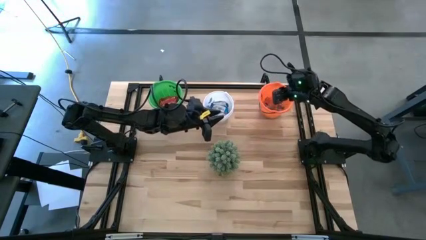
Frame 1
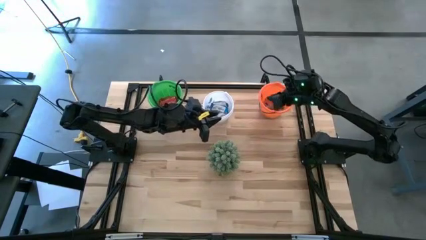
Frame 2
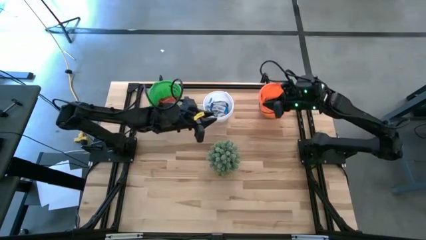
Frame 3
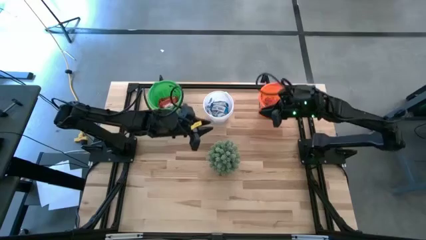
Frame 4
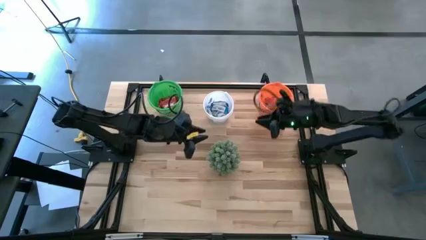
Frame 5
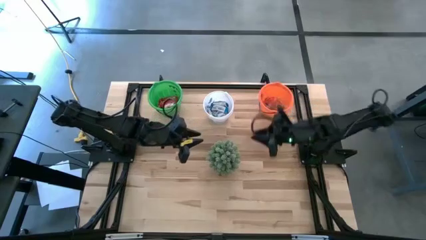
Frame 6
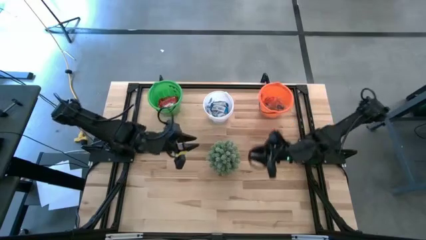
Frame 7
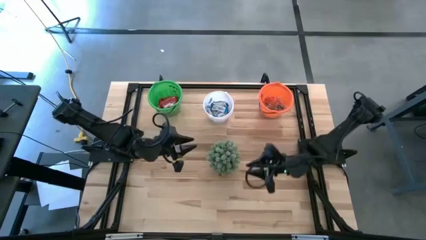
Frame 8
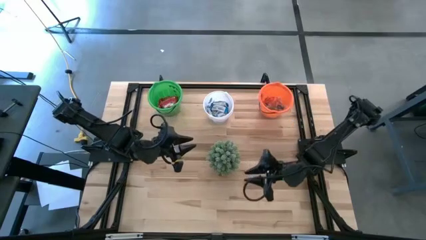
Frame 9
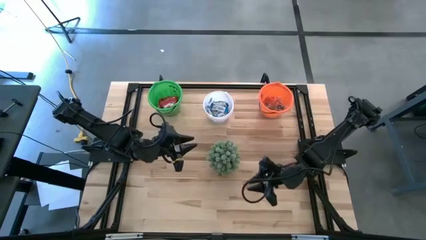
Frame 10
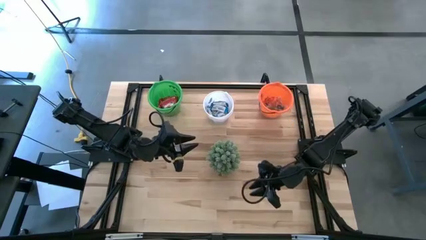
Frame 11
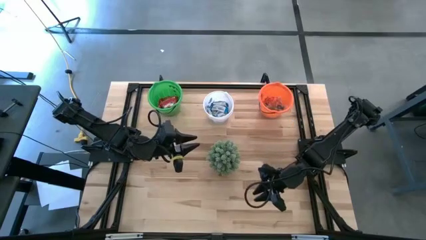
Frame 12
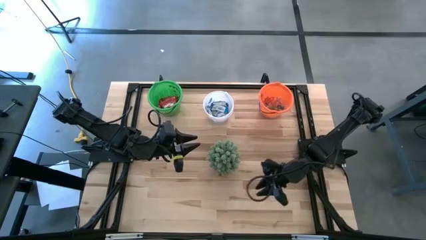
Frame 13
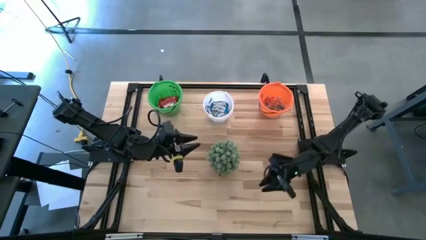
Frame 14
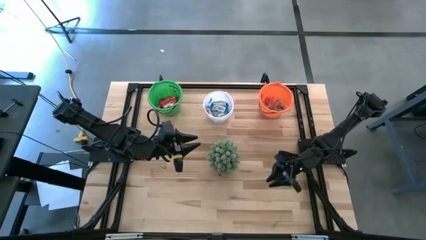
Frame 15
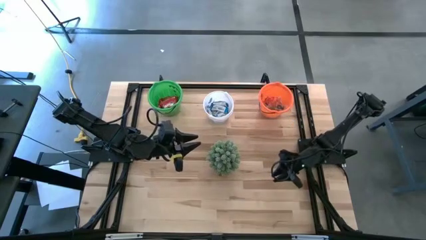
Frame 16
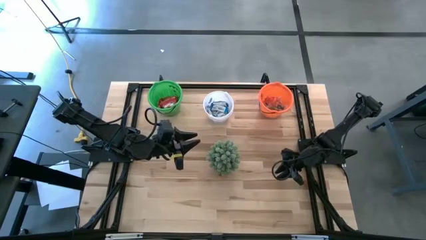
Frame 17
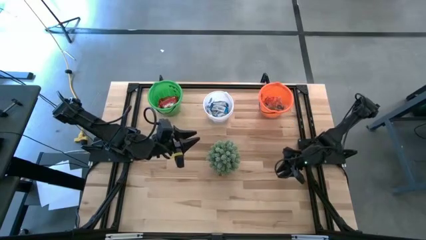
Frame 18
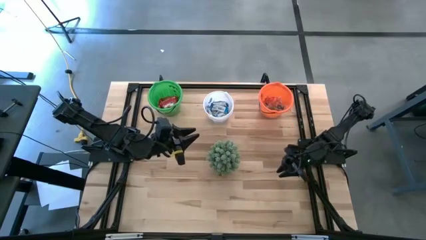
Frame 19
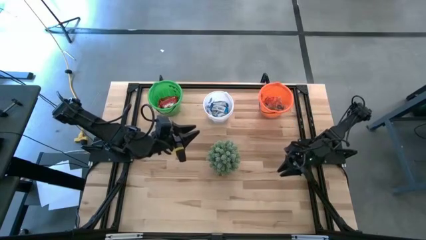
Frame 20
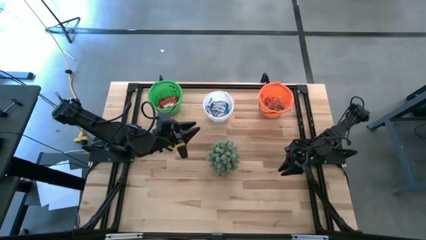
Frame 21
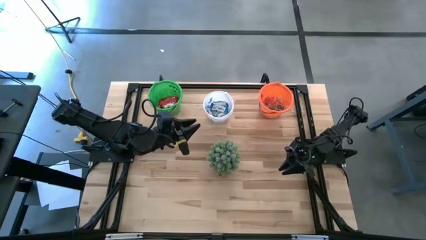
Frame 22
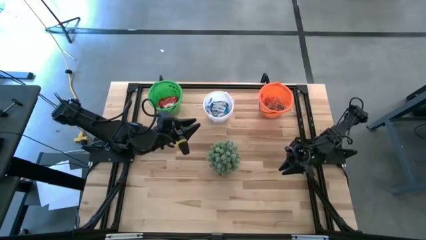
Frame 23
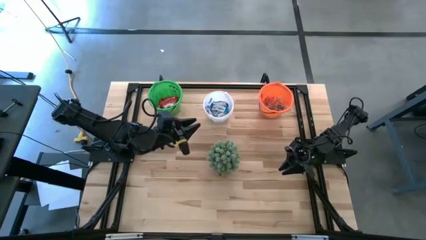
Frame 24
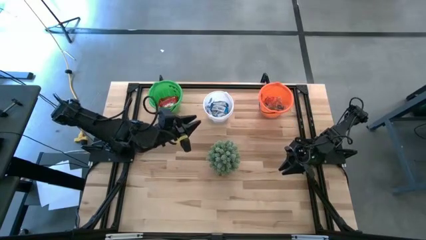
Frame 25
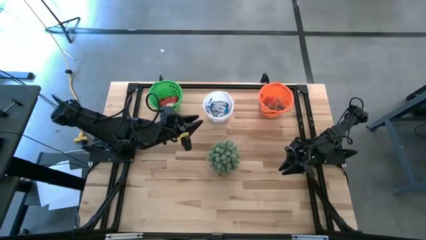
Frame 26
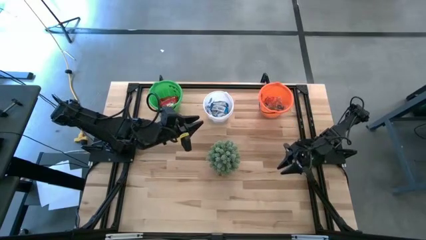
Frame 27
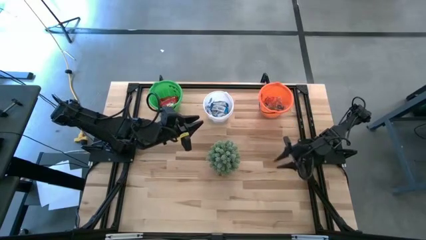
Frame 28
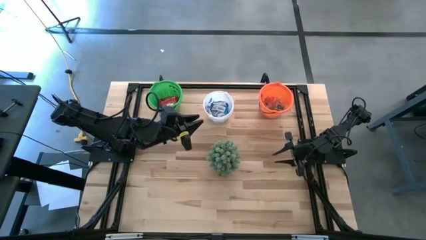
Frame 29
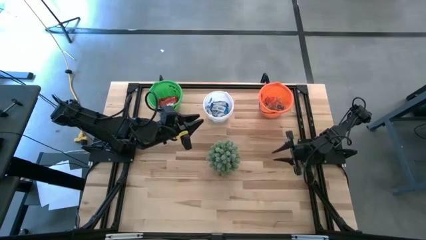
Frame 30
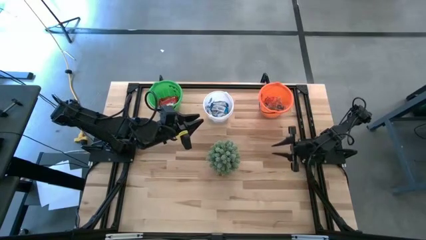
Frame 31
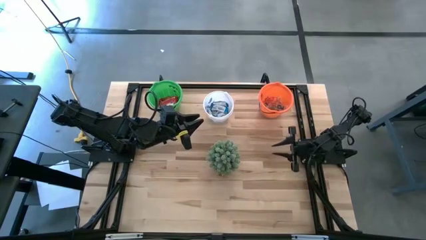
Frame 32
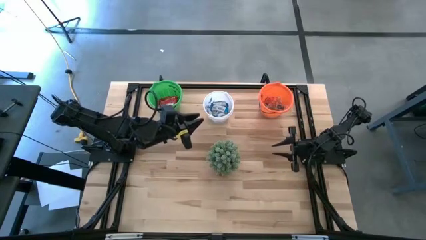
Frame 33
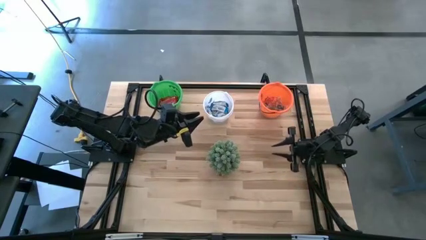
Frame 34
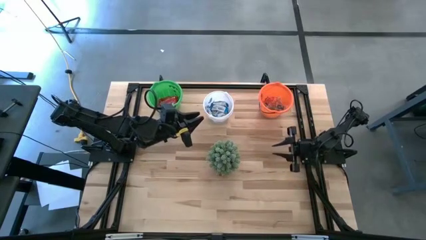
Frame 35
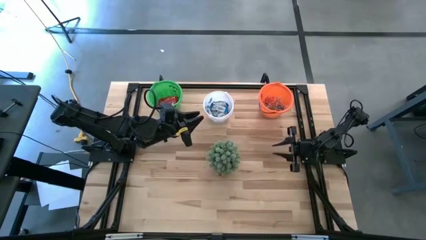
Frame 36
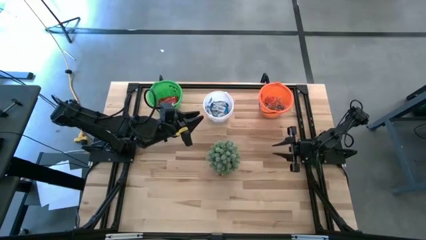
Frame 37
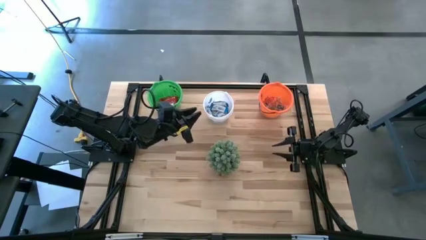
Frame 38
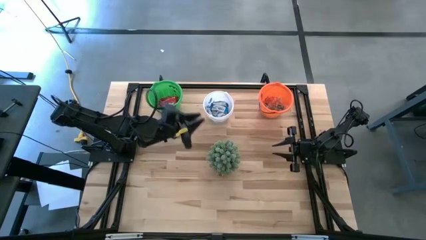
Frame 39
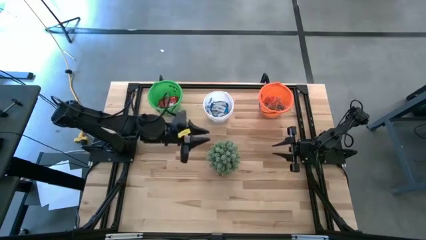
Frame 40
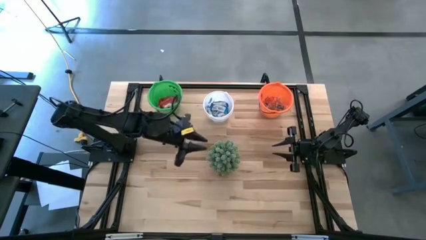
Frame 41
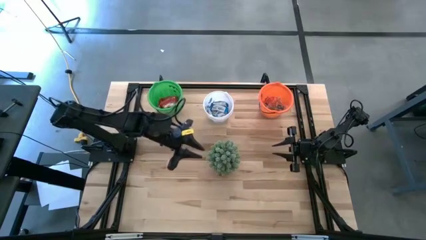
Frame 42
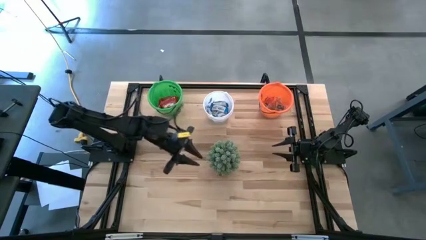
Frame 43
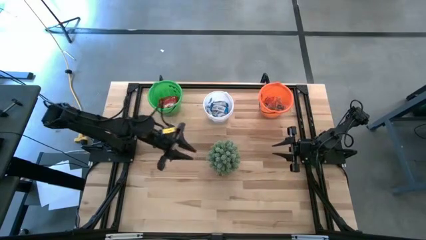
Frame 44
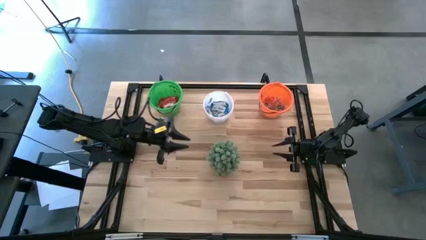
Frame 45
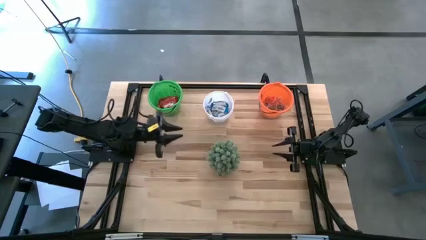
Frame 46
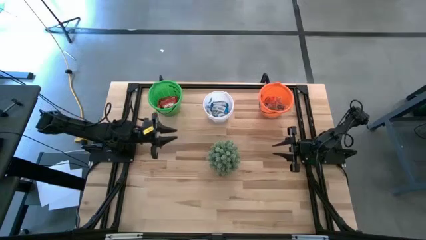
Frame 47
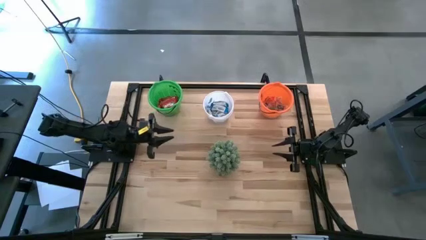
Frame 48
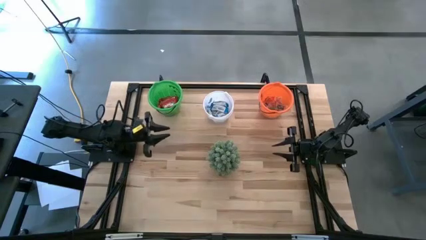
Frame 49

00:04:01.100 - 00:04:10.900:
Task: Sort candy
Return to Home Position

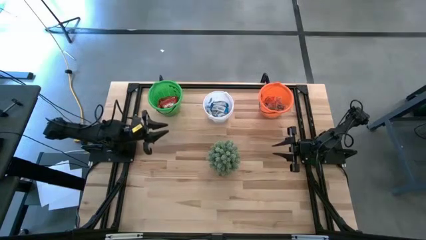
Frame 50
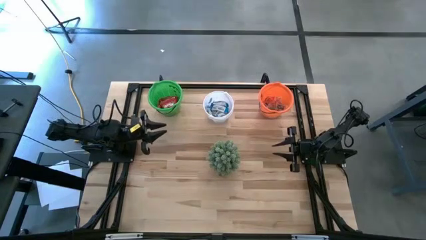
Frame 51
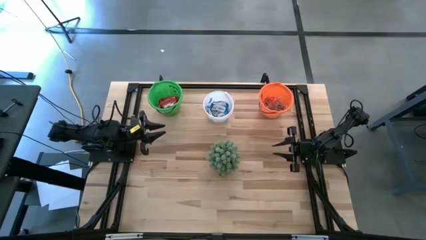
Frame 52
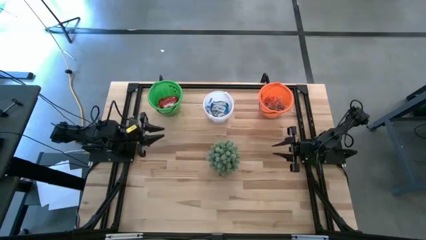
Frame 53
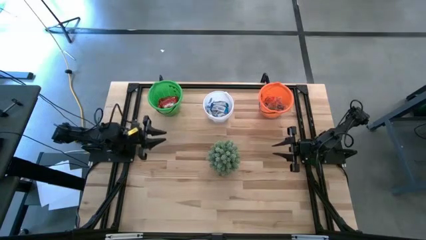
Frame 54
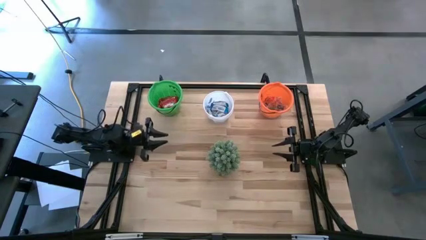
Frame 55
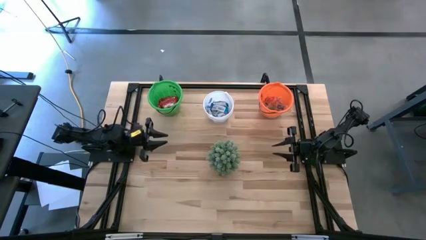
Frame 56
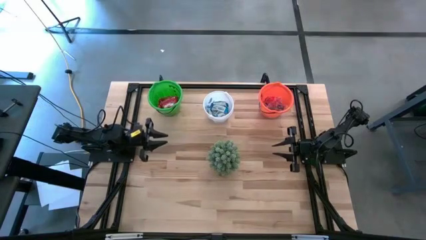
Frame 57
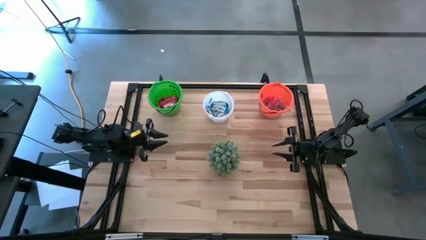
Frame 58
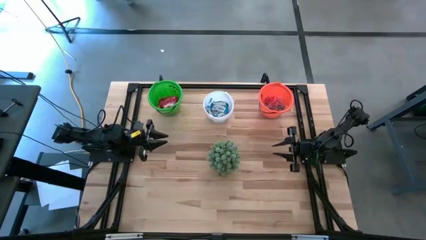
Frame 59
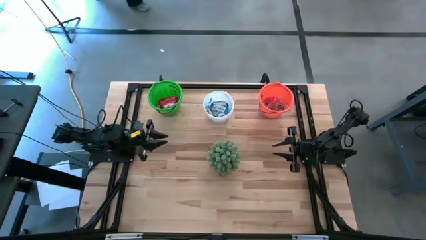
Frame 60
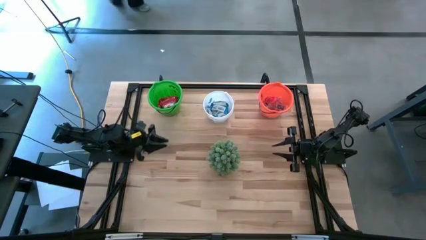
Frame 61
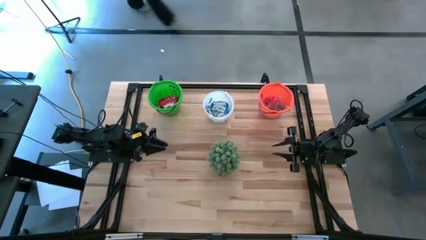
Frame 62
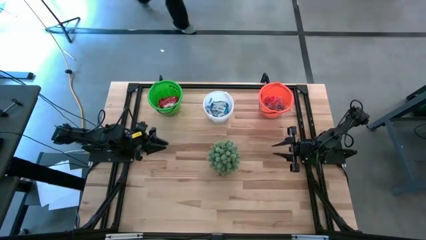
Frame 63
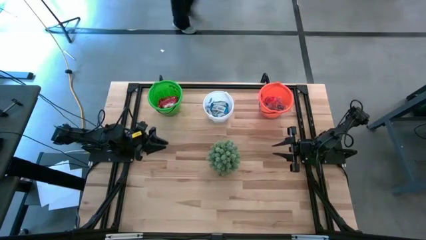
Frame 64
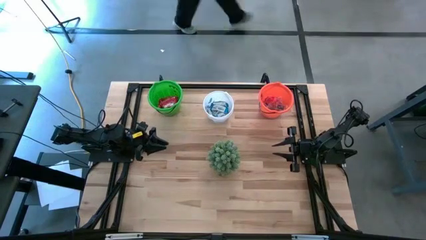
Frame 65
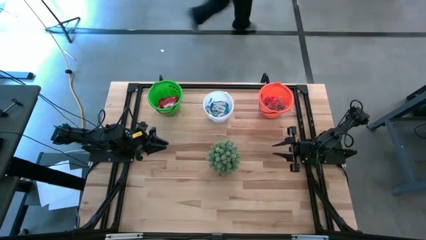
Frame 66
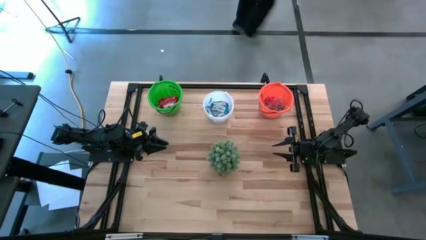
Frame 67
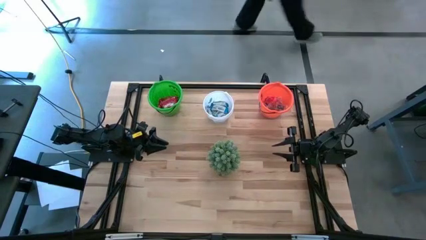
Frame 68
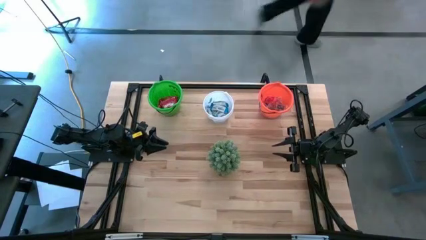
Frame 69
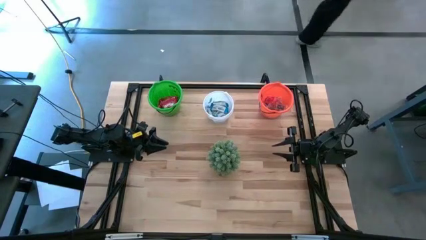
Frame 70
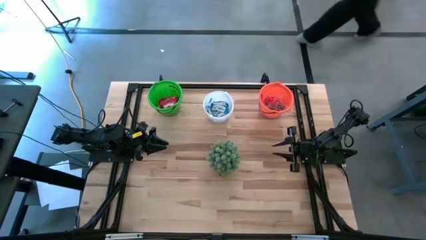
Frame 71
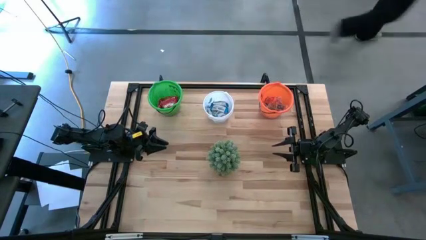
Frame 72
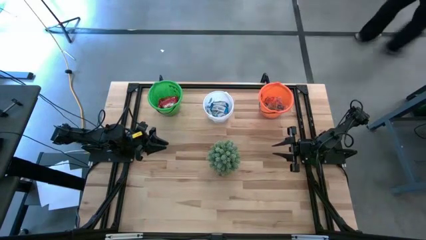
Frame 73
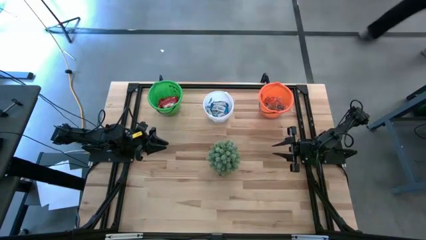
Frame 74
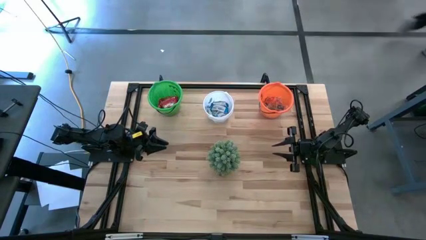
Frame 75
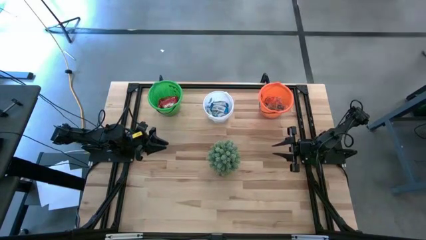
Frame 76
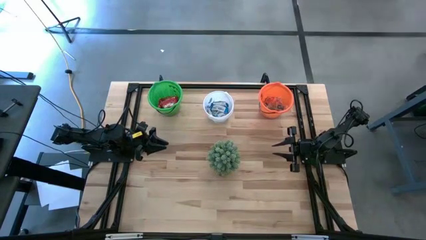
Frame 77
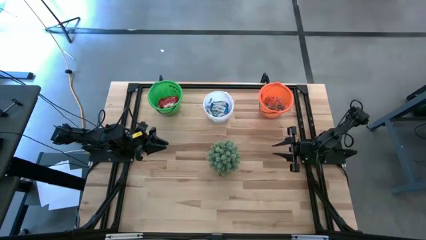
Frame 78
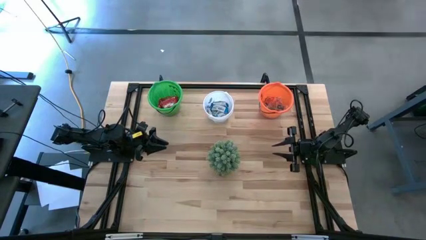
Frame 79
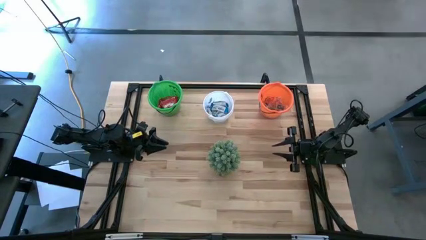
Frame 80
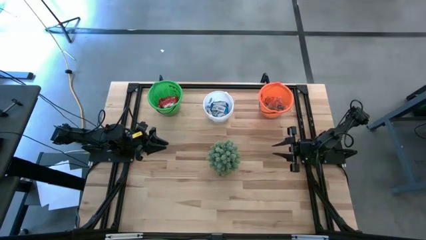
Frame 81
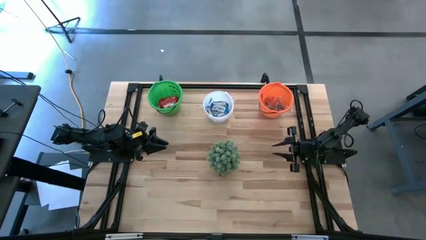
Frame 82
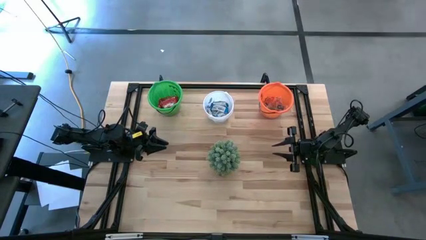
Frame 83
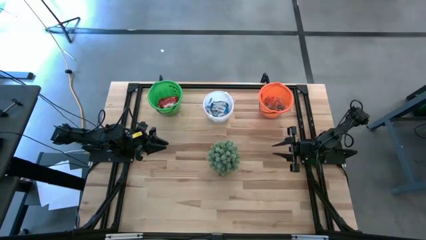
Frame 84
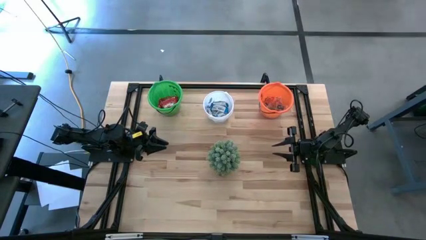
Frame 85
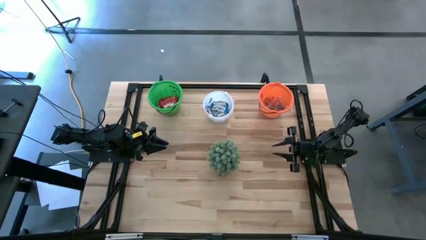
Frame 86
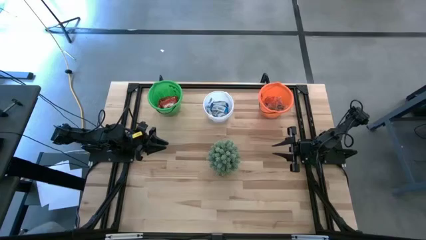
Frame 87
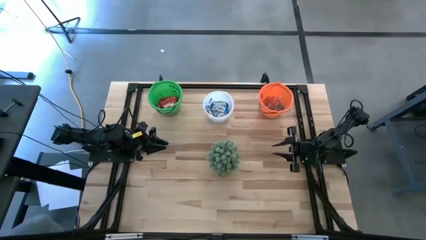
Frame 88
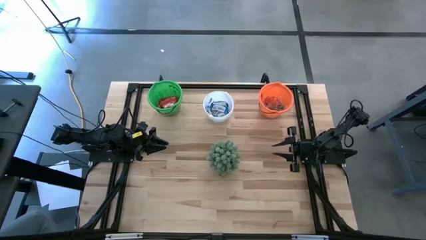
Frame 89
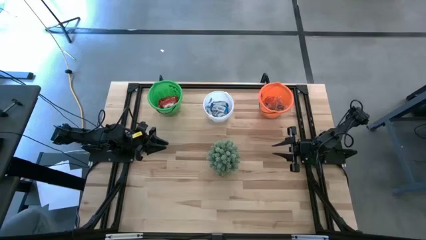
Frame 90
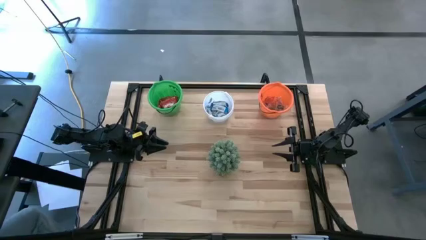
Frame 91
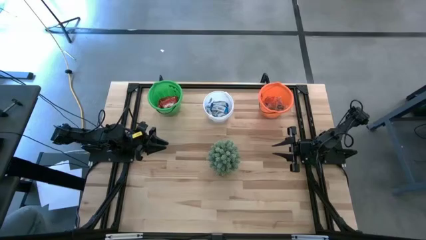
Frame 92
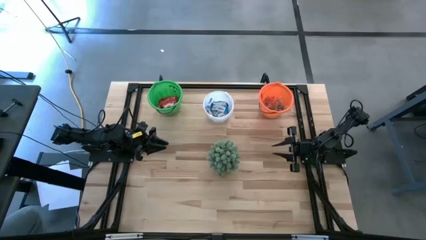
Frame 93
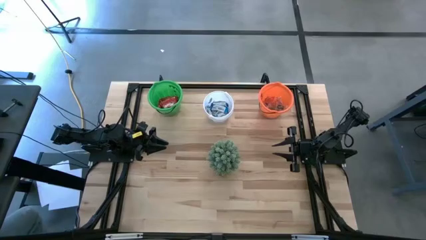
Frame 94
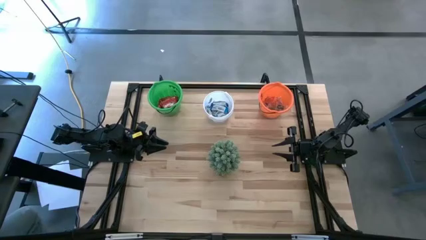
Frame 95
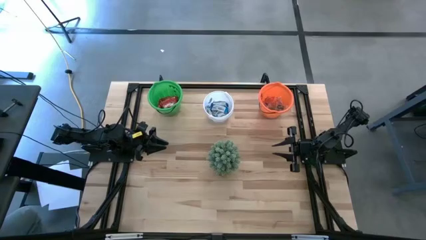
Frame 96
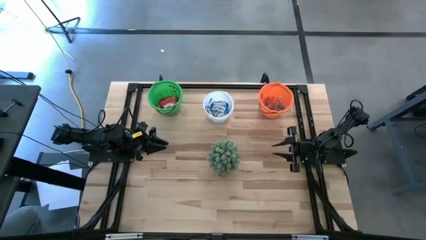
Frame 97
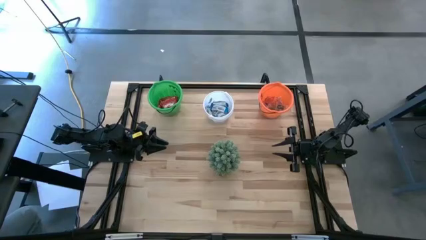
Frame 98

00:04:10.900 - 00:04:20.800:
Return to Home Position
